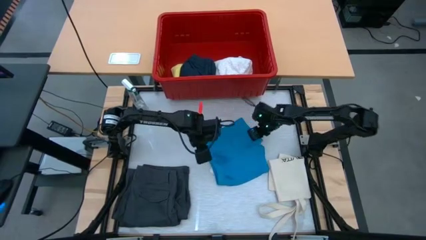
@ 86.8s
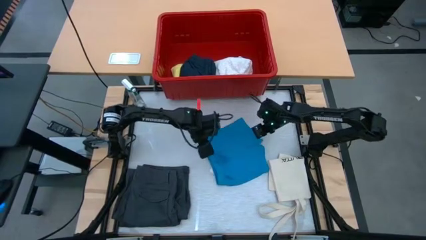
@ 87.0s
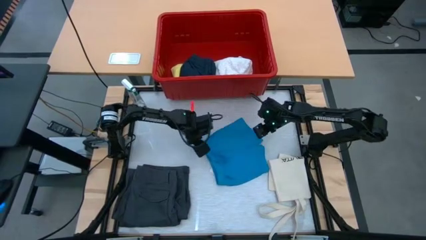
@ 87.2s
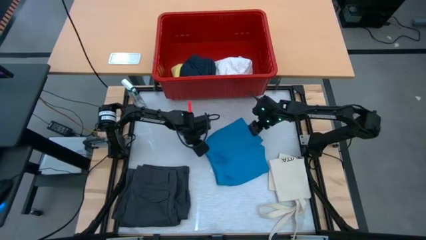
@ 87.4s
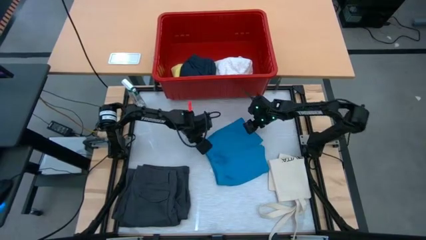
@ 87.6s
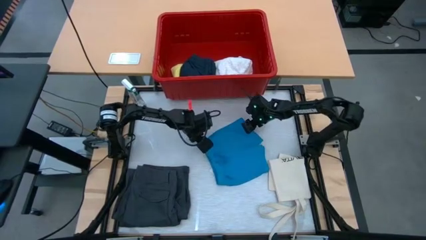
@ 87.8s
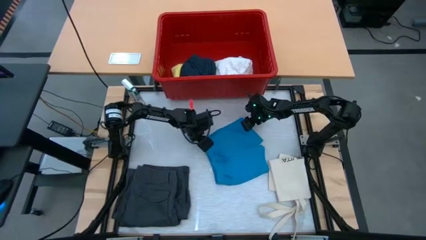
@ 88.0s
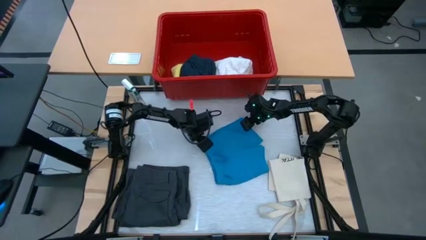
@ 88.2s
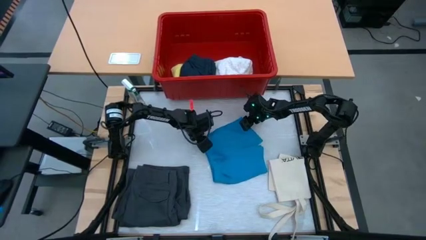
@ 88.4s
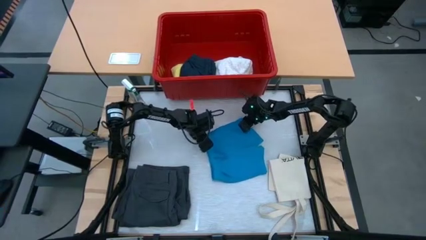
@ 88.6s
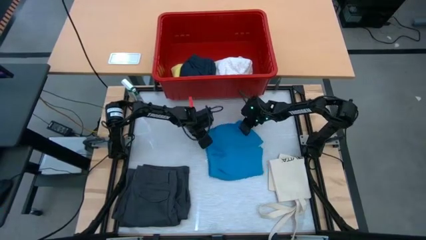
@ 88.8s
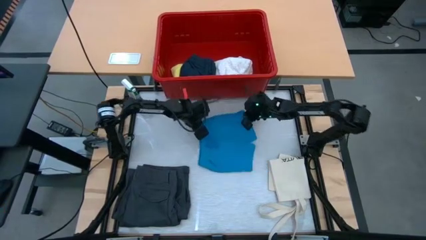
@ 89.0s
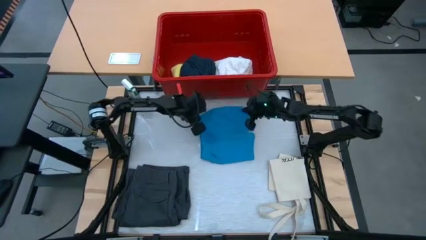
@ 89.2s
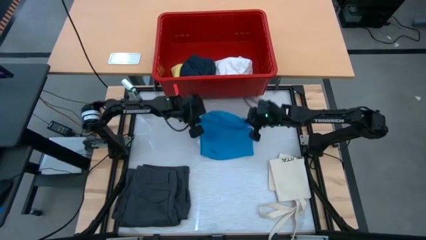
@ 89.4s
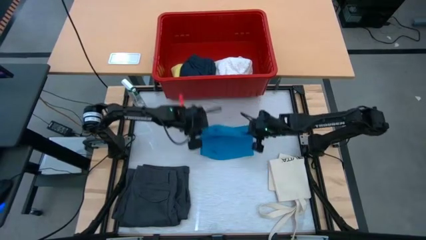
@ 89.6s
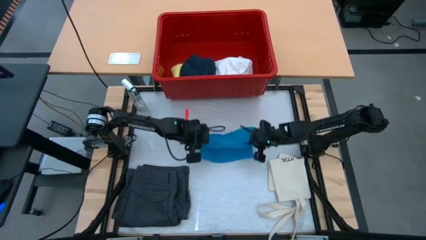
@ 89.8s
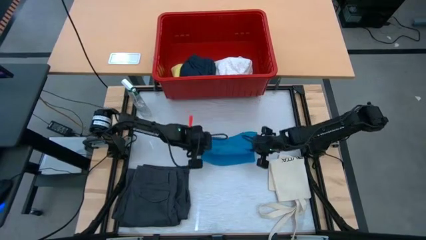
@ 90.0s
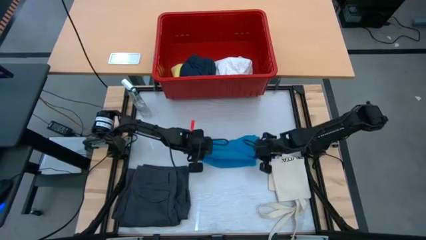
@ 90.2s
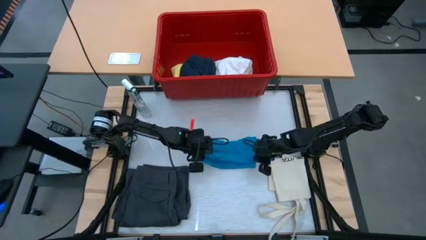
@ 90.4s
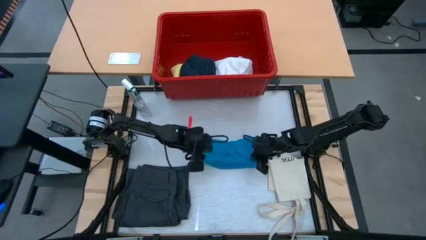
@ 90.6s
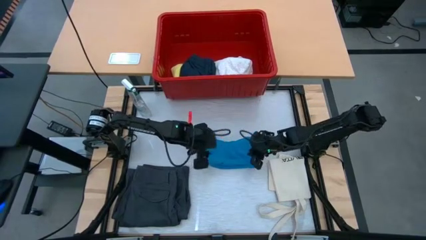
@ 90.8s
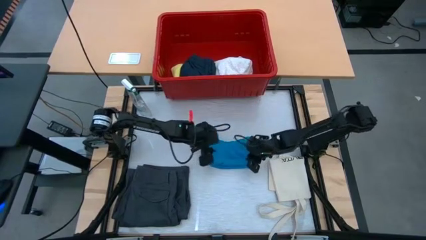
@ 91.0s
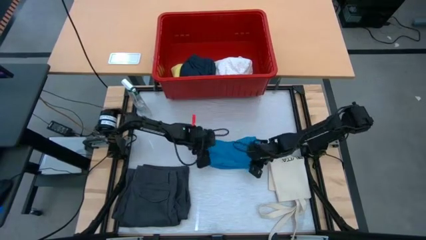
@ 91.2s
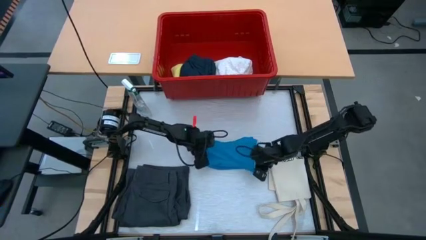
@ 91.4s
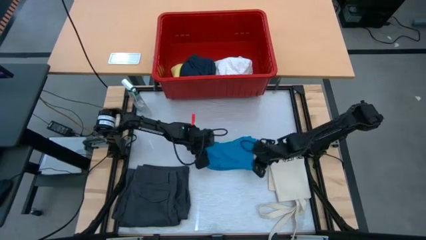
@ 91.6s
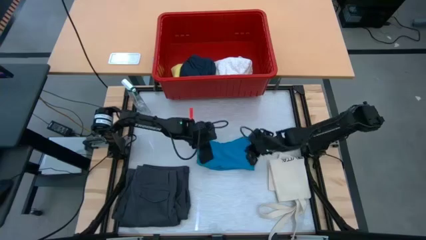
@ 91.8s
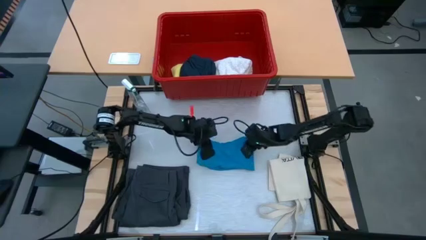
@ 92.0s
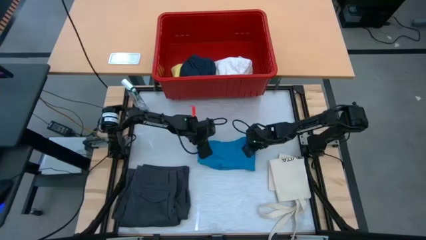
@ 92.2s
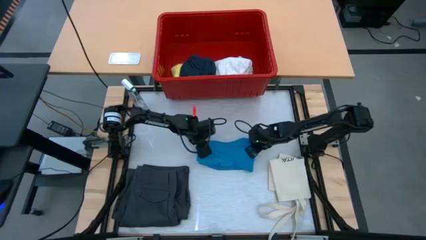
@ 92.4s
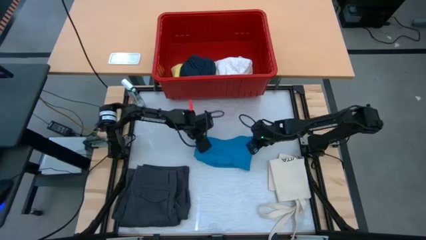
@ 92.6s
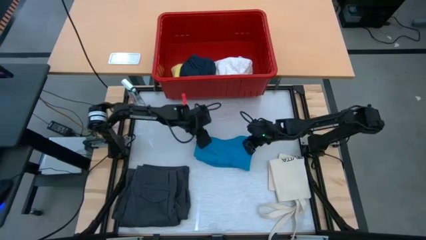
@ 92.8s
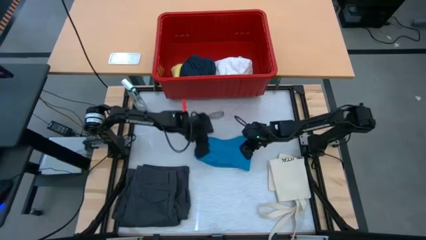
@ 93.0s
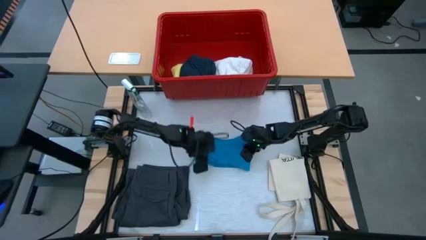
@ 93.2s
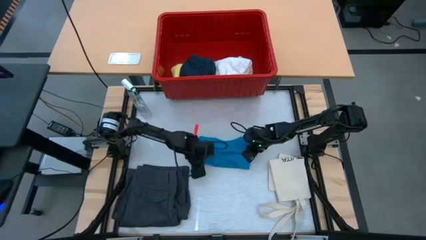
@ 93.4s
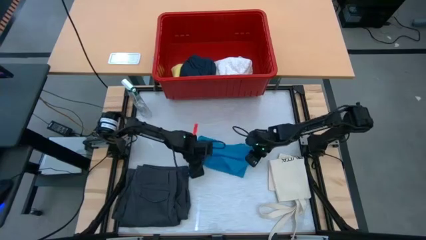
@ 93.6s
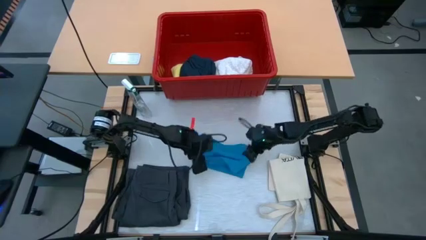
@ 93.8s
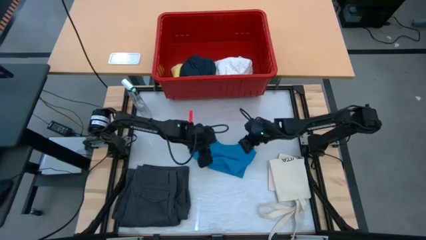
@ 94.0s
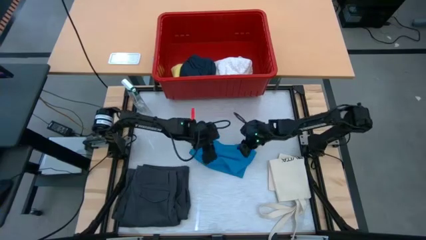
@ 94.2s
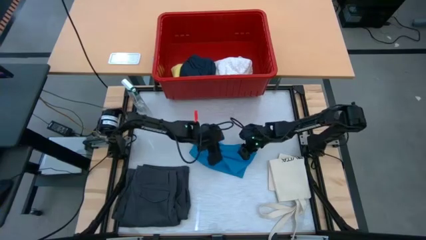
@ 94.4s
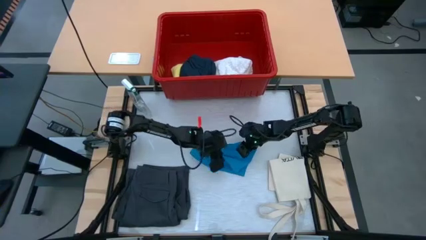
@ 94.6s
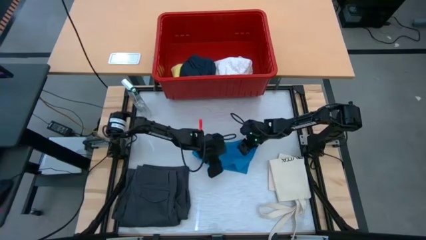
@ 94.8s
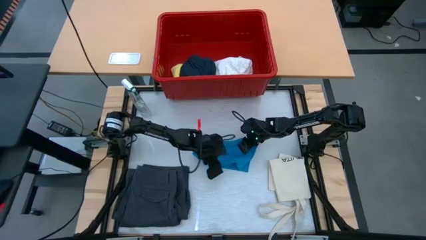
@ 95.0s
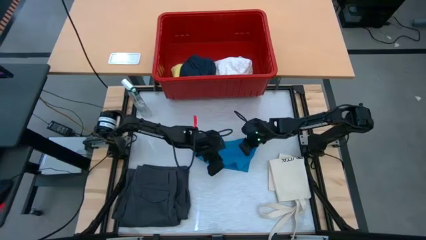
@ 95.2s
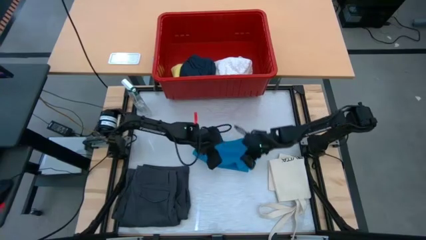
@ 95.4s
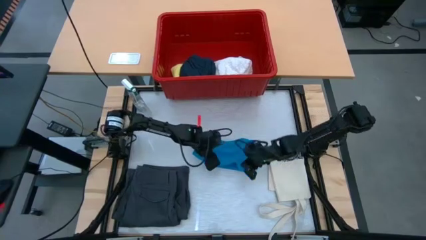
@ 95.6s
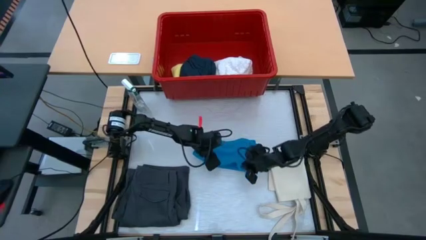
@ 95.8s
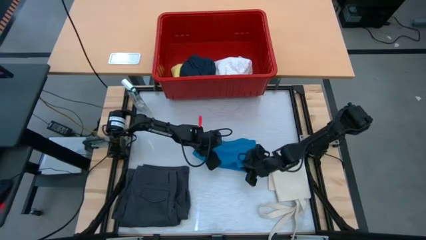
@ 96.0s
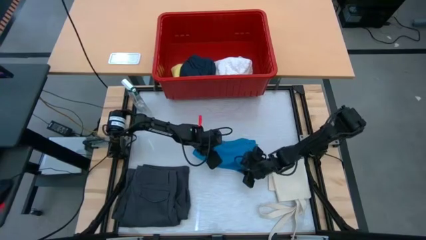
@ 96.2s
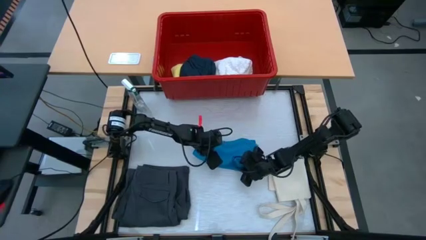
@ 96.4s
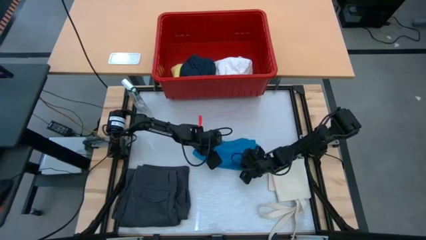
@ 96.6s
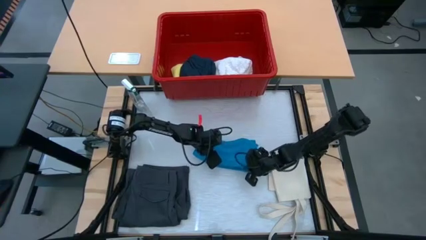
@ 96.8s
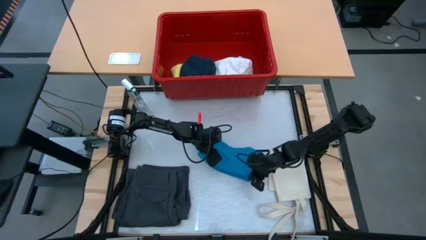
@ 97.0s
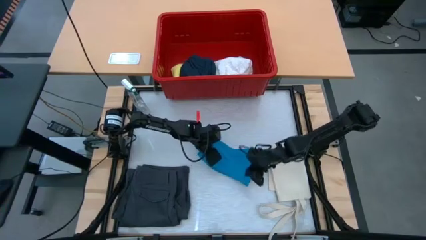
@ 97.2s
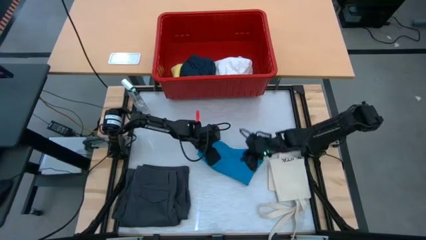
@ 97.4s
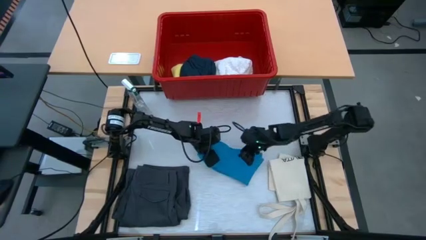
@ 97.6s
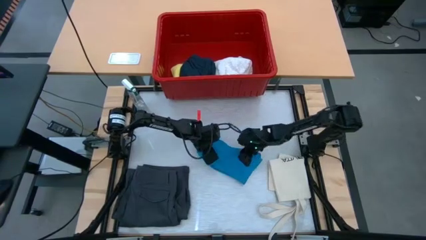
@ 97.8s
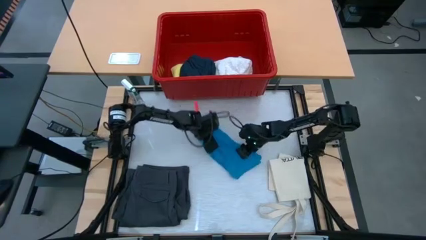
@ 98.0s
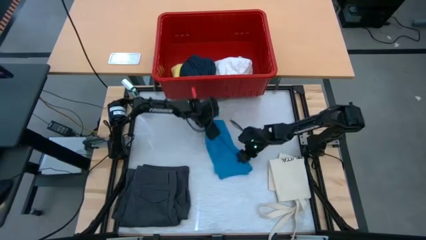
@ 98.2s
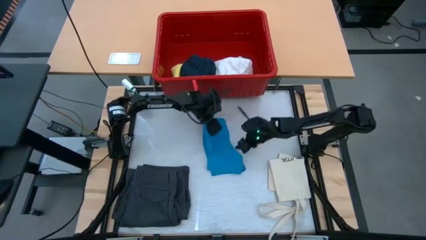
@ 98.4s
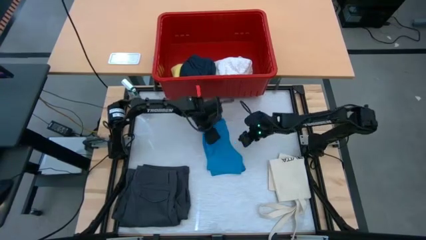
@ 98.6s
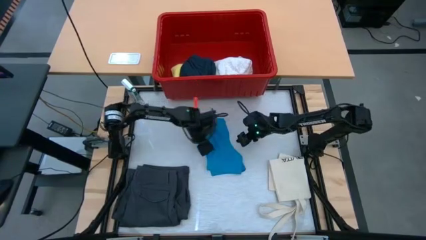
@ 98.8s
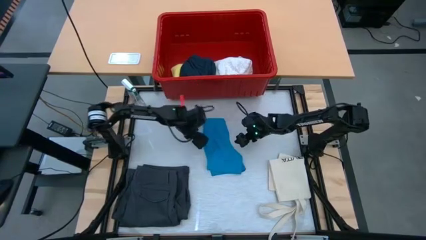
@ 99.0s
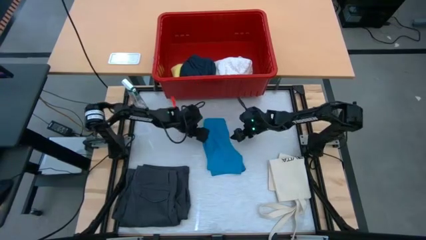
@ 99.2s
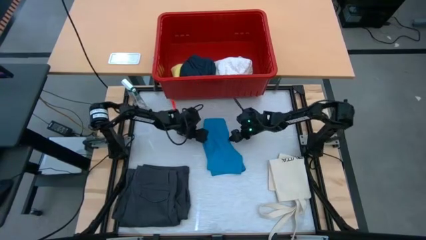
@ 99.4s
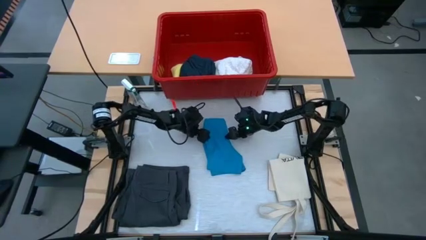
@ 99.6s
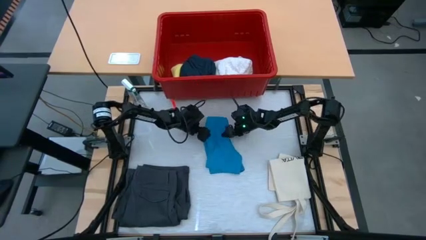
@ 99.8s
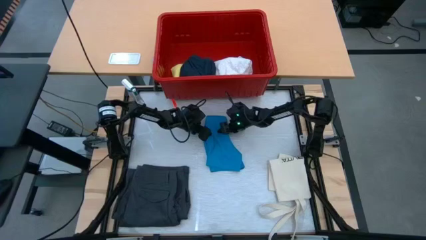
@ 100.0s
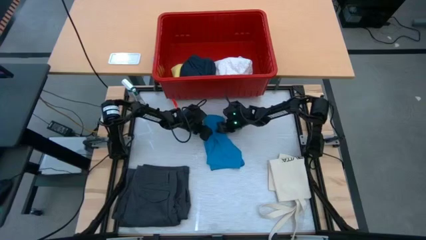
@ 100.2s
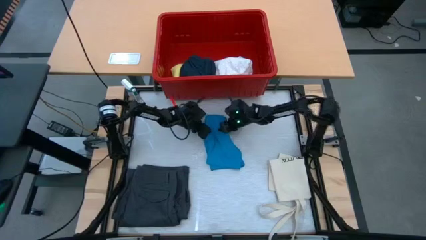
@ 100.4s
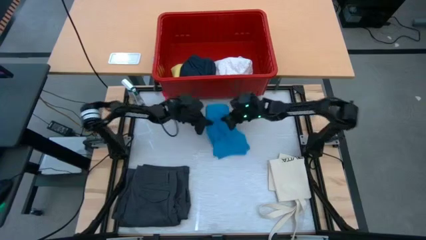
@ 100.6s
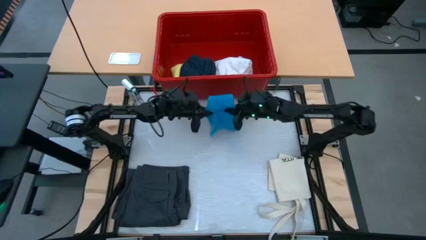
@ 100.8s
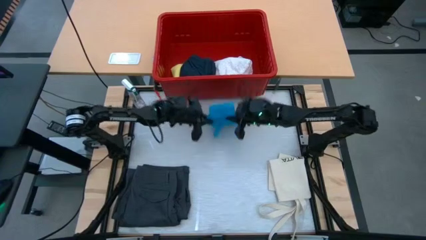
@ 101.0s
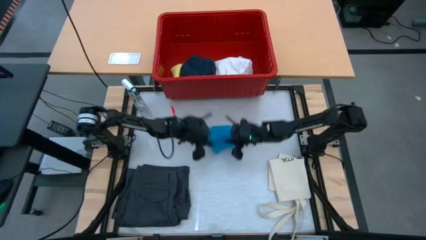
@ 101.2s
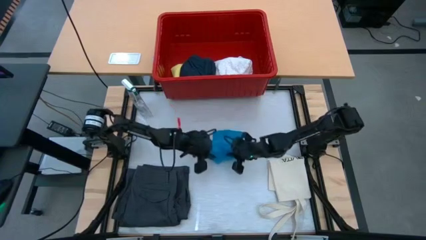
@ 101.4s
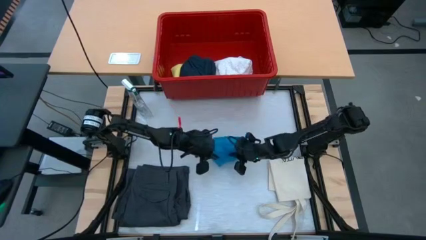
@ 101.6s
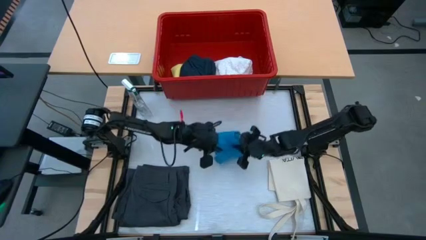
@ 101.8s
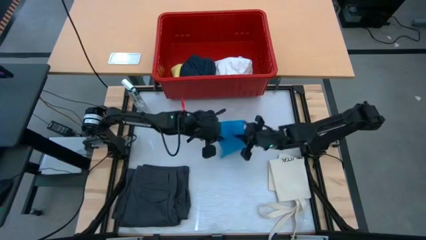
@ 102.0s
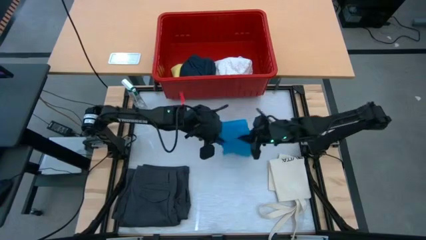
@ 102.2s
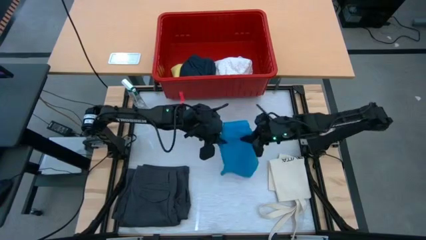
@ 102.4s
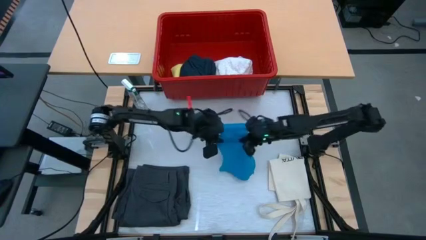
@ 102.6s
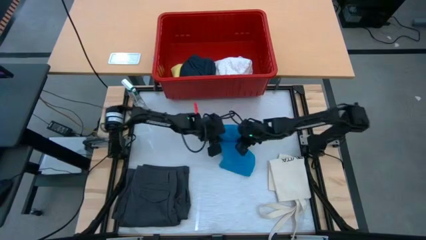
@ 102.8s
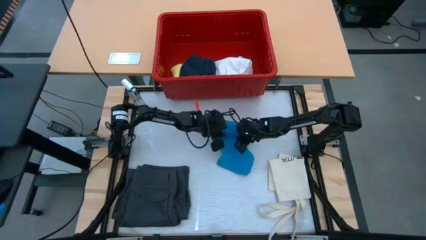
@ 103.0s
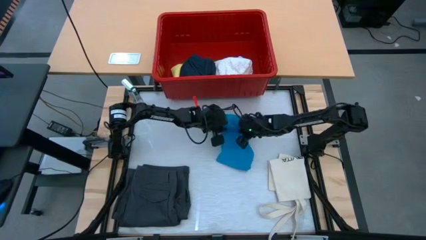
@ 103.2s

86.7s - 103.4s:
Task: Fold laundry
Fold the blue shorts
